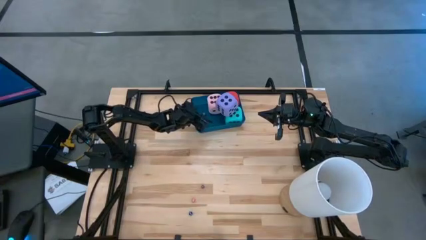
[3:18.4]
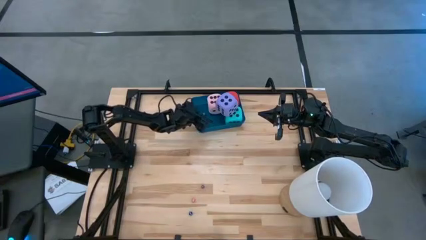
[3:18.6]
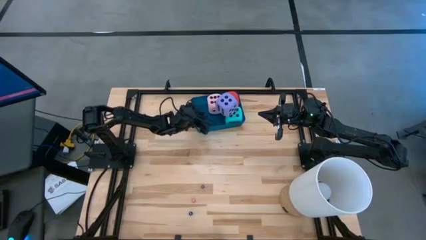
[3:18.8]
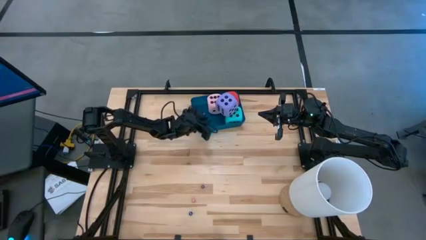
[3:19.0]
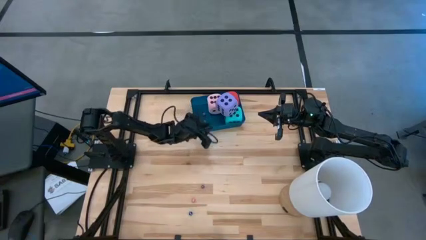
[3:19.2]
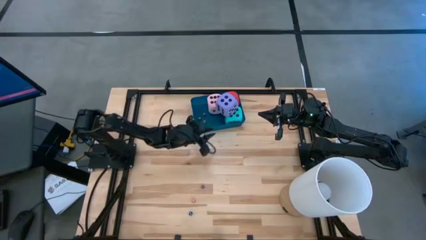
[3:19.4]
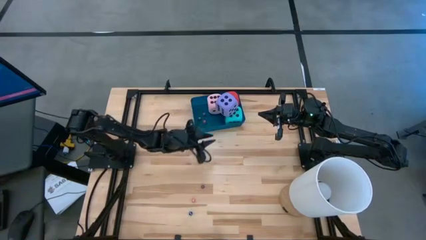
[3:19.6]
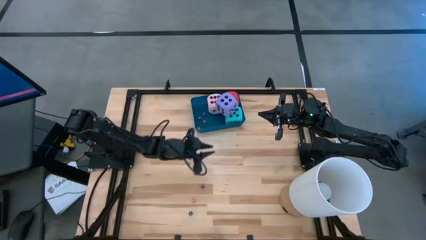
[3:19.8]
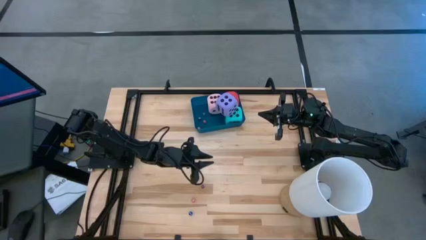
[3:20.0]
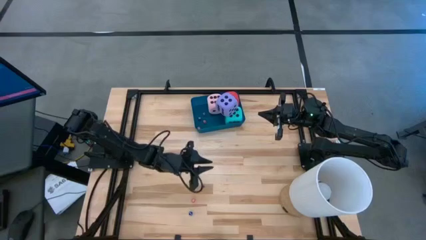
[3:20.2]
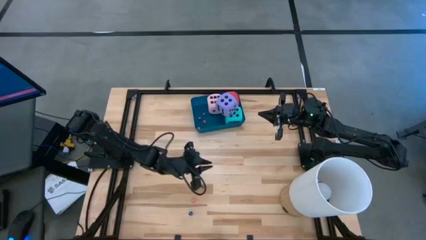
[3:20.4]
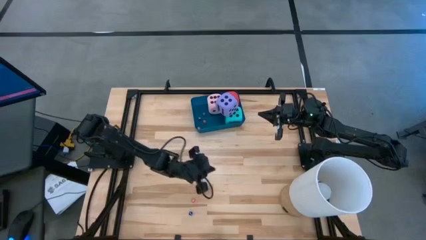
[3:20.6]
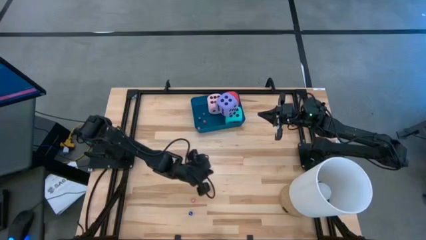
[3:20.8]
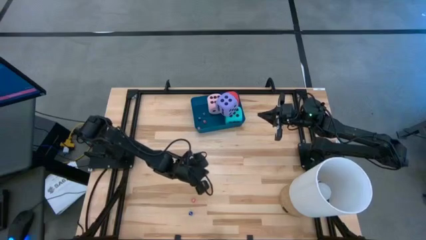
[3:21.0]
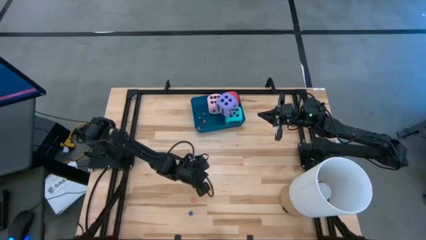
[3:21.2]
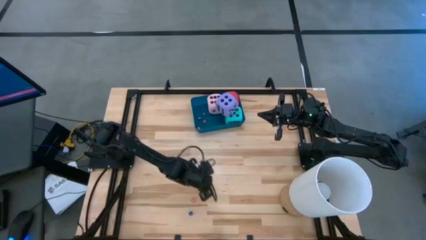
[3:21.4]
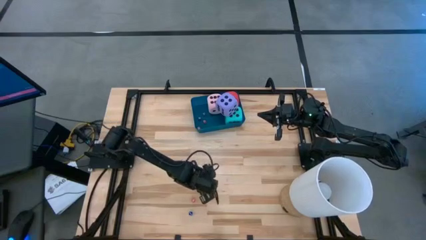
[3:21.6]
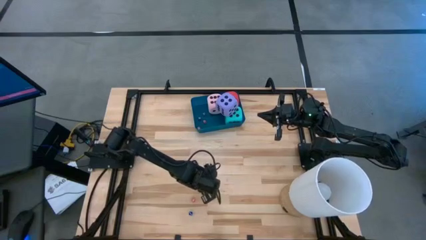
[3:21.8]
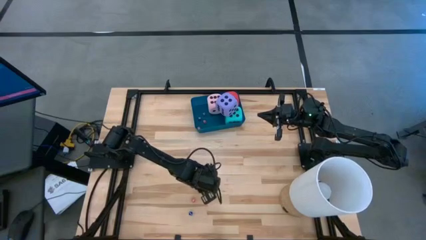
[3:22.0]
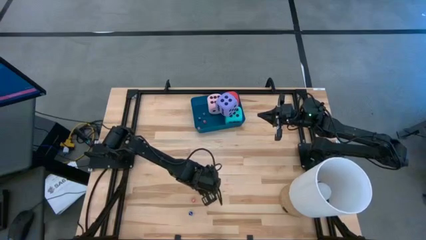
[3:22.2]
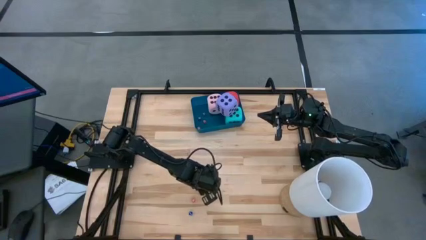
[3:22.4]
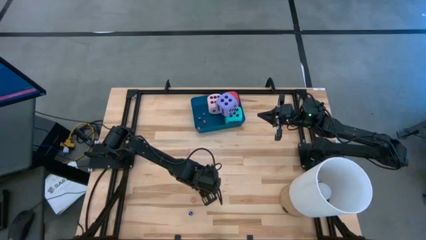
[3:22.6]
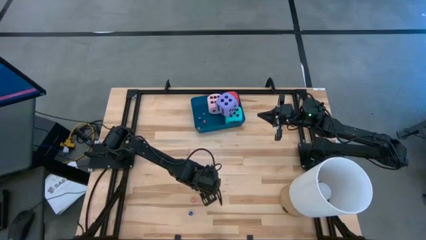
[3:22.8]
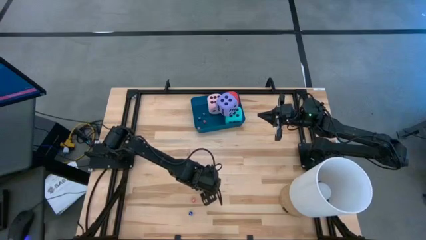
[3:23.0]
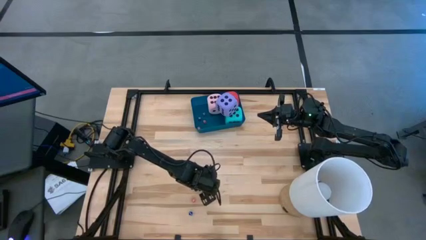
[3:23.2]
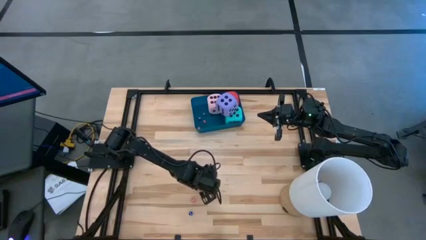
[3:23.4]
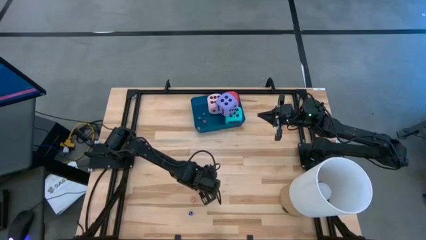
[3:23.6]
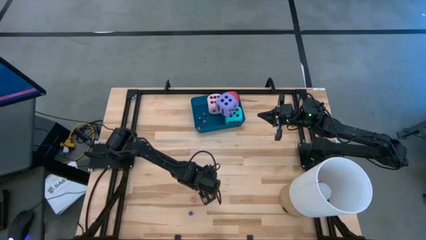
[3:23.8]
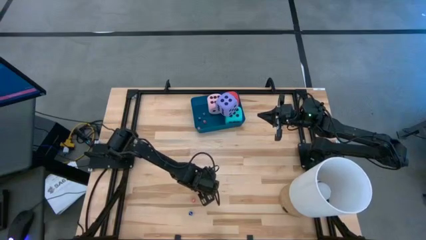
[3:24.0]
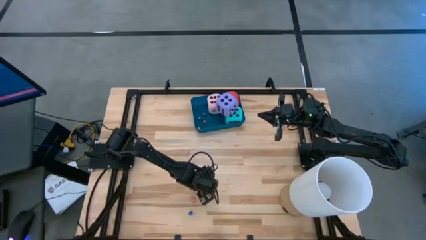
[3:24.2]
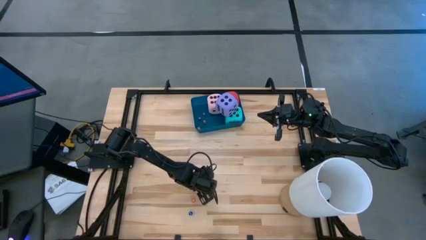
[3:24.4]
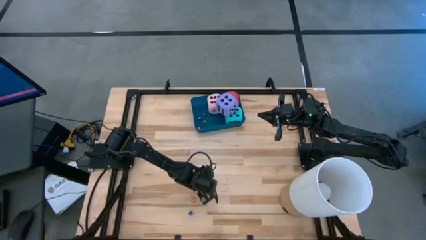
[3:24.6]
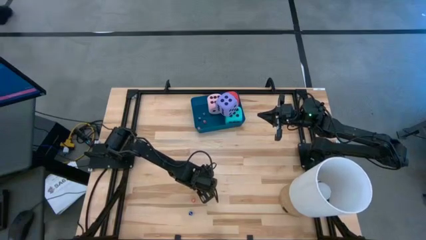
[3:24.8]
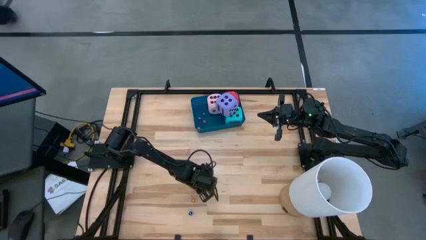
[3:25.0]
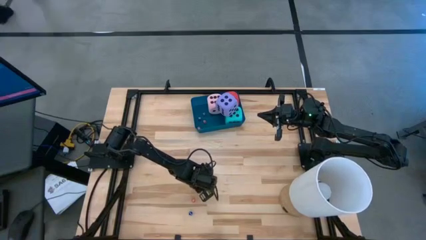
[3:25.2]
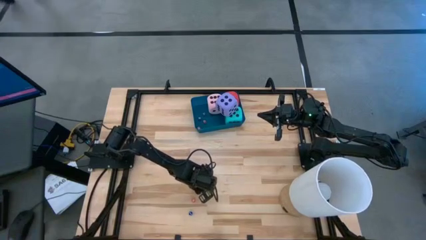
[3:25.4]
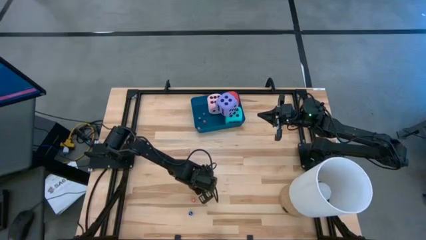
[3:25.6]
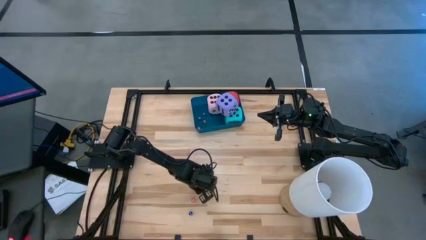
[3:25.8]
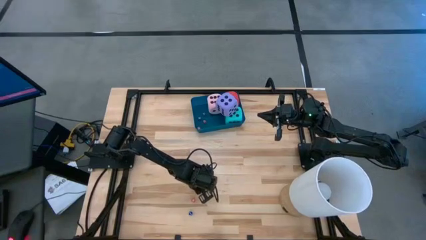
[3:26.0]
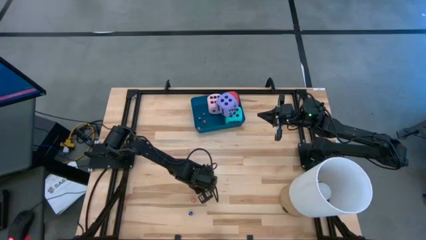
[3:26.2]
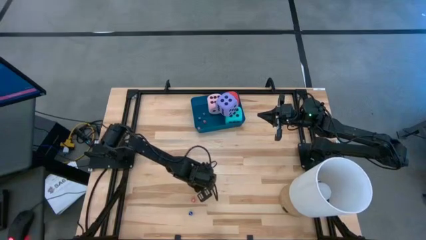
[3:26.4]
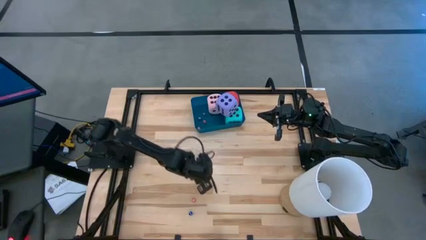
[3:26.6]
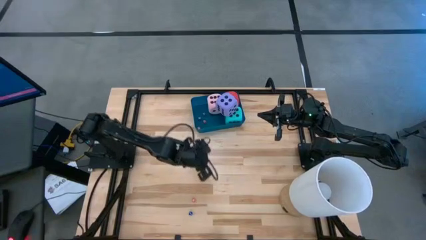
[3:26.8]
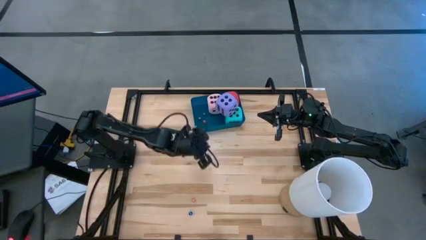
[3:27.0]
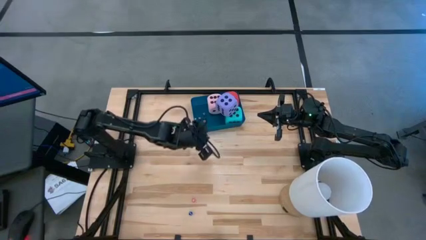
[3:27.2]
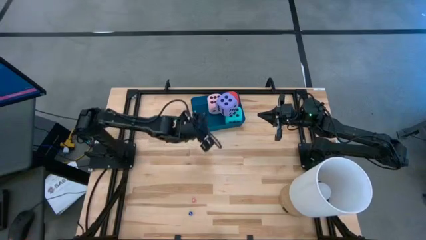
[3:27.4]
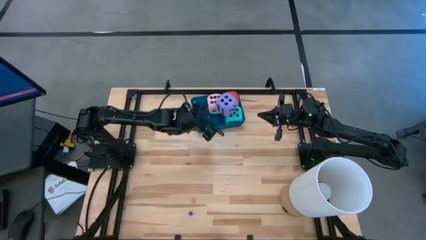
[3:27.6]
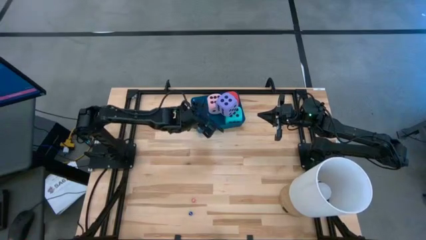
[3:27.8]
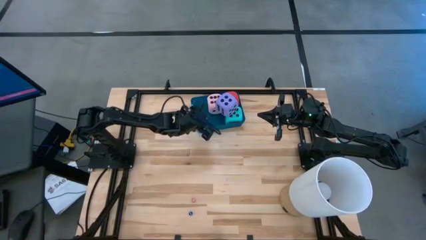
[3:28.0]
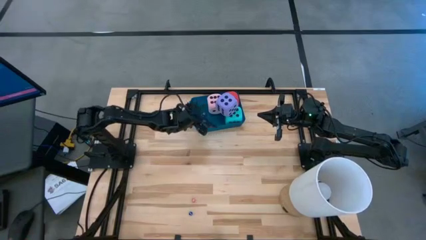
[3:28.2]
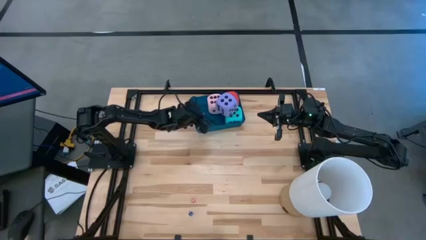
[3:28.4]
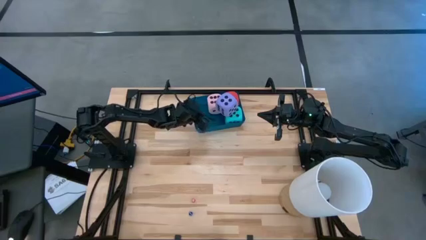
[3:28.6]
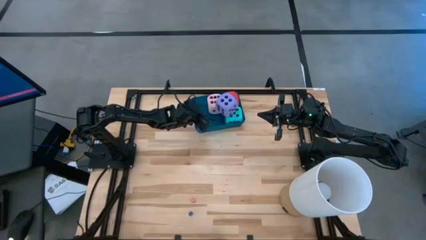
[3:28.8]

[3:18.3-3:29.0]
Task: Pick & Place Dice
Put the small purple dice into the blue bin
